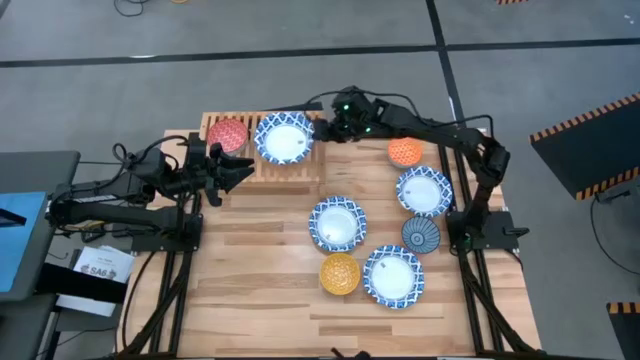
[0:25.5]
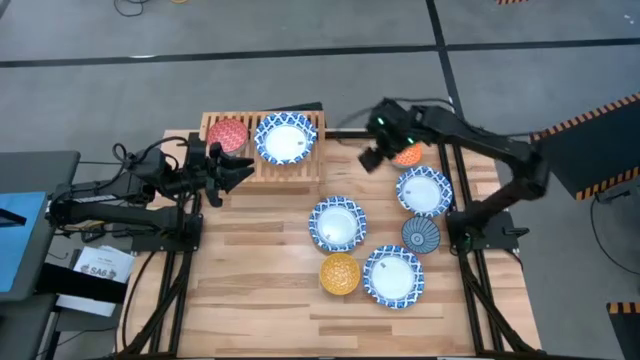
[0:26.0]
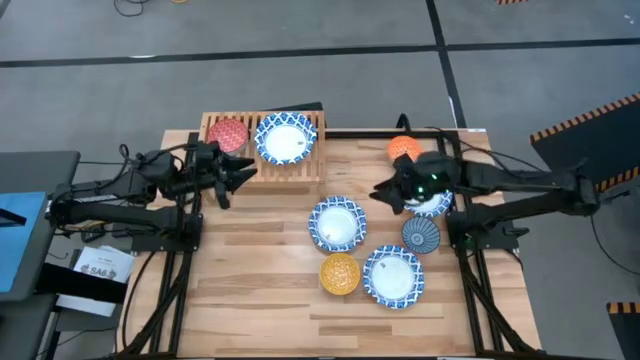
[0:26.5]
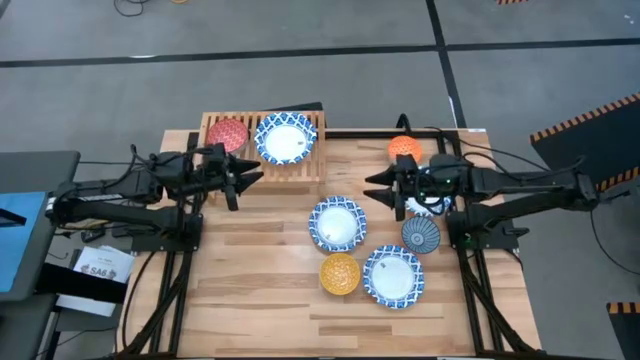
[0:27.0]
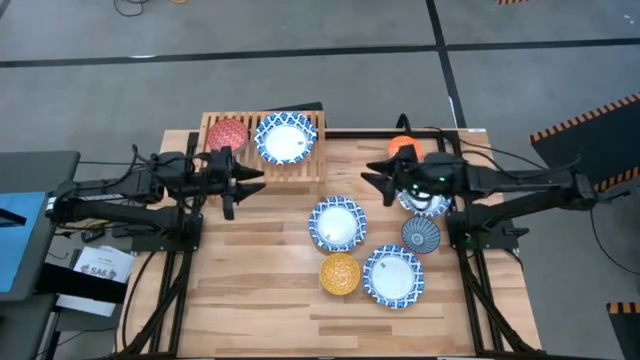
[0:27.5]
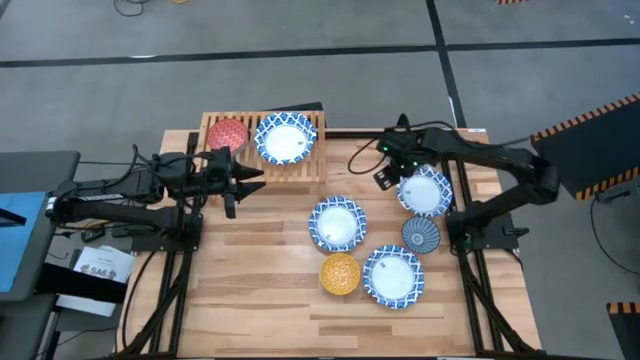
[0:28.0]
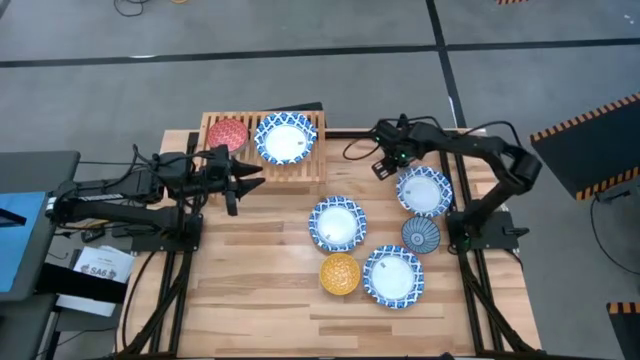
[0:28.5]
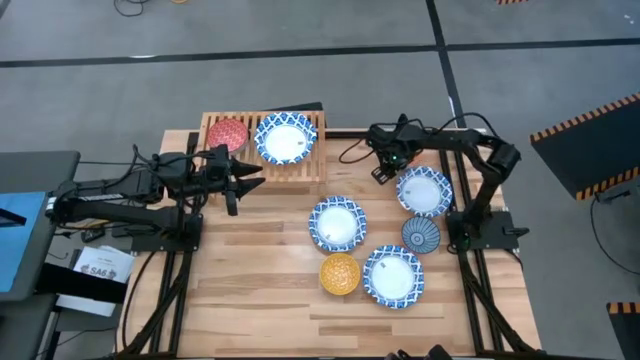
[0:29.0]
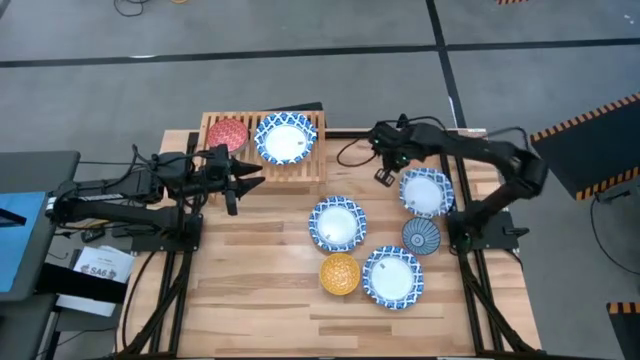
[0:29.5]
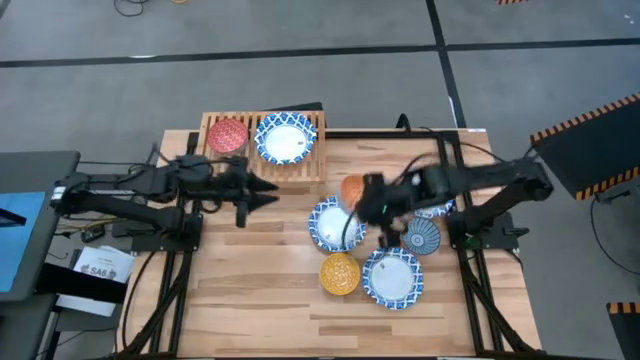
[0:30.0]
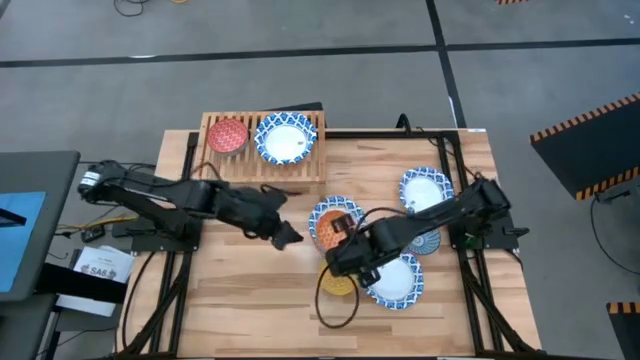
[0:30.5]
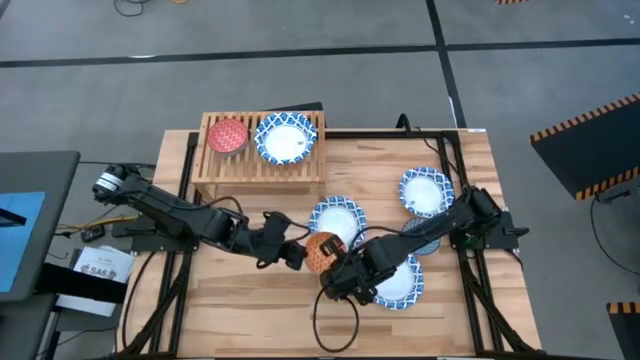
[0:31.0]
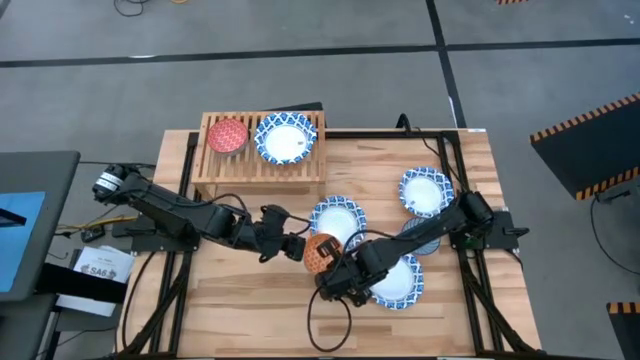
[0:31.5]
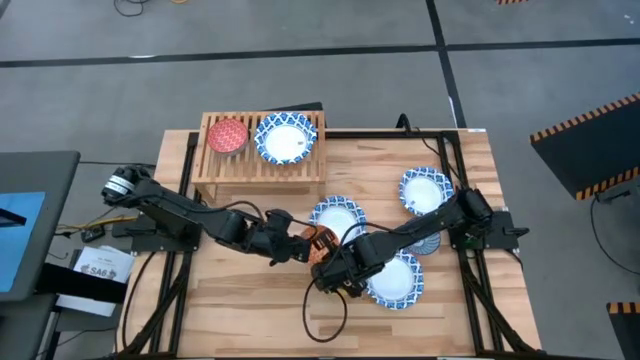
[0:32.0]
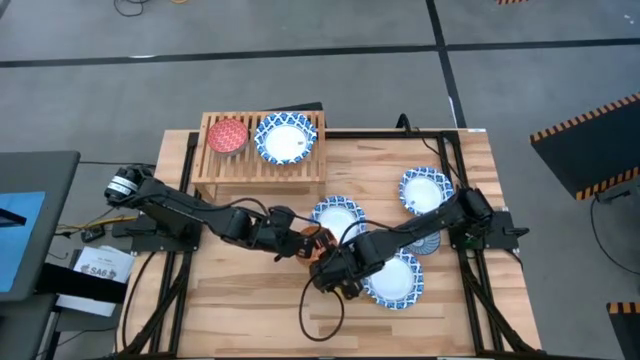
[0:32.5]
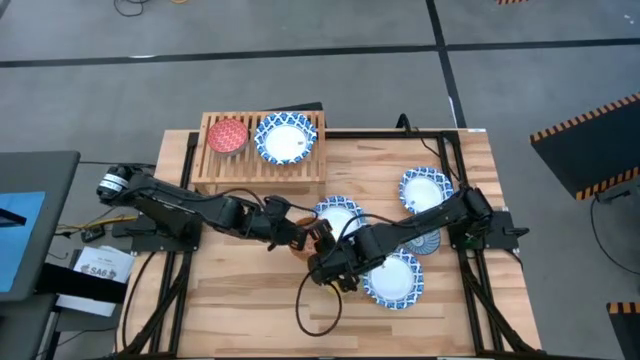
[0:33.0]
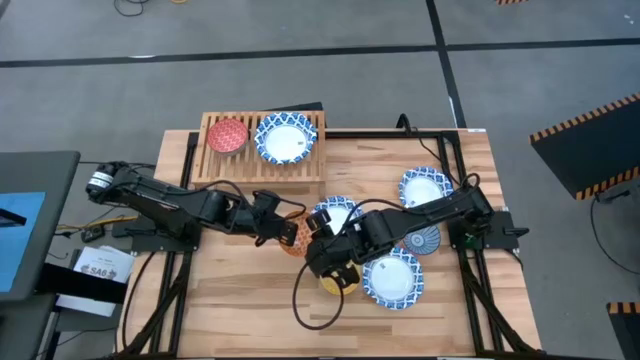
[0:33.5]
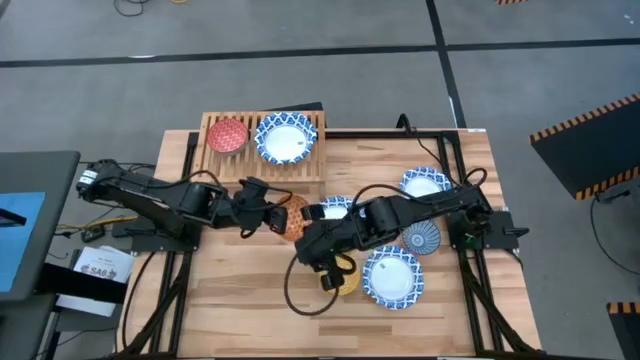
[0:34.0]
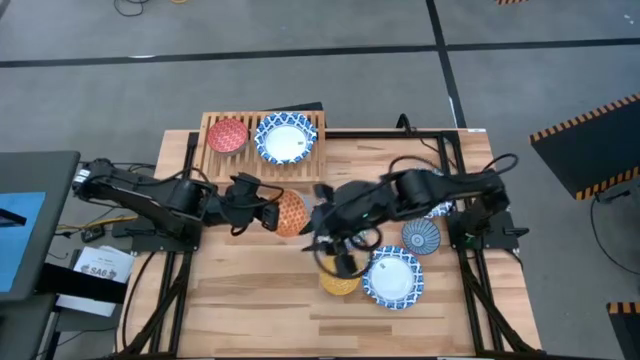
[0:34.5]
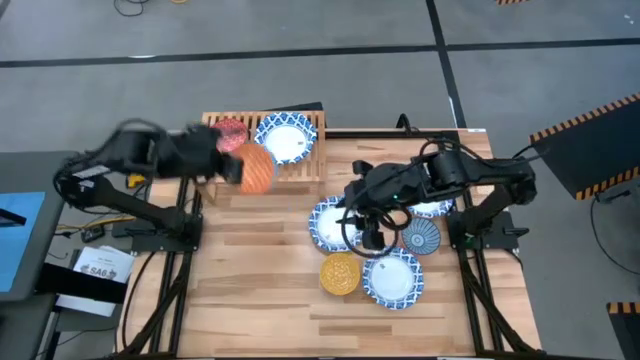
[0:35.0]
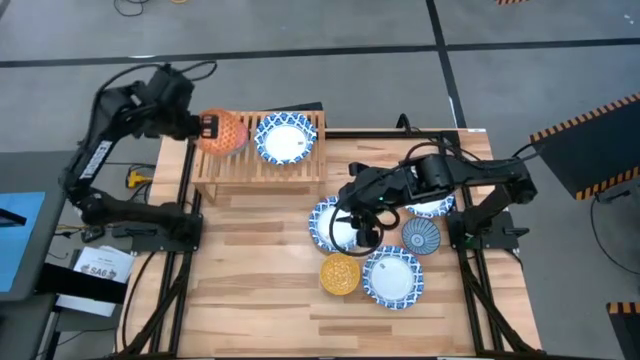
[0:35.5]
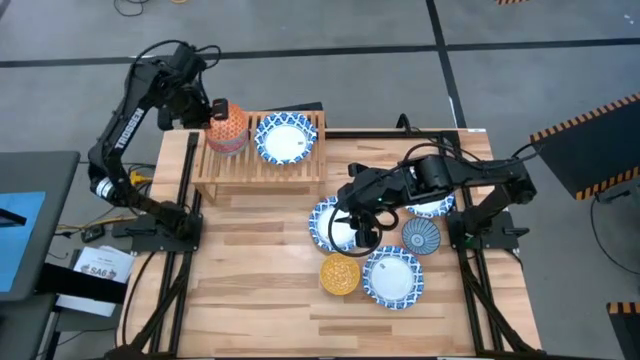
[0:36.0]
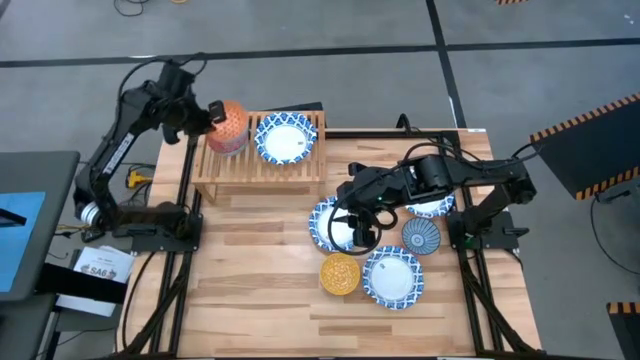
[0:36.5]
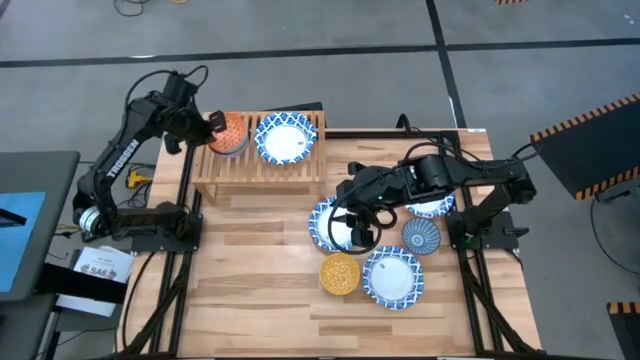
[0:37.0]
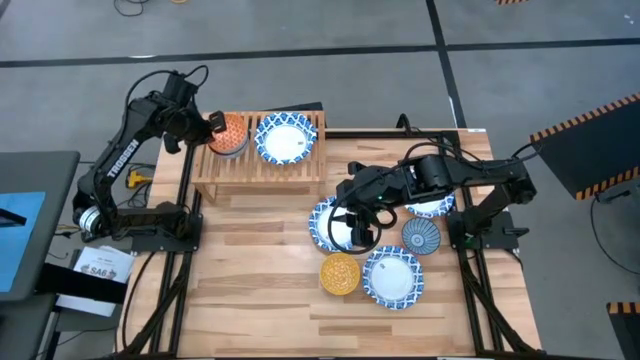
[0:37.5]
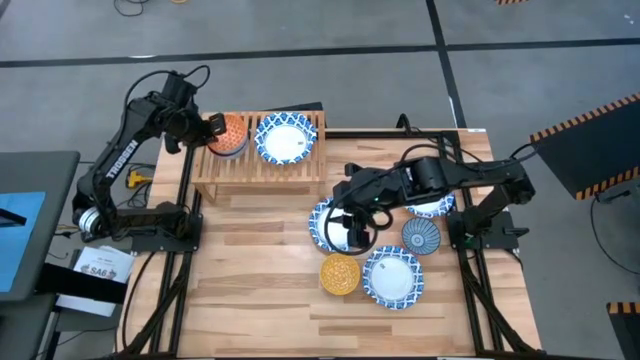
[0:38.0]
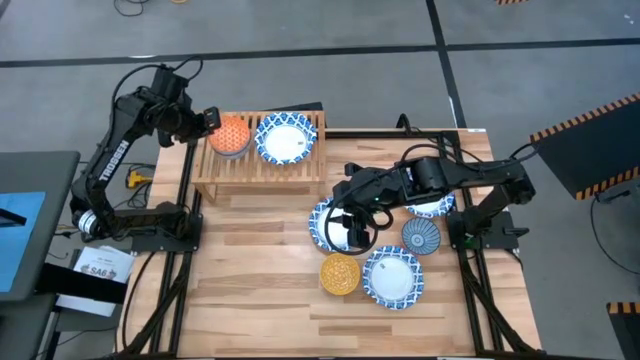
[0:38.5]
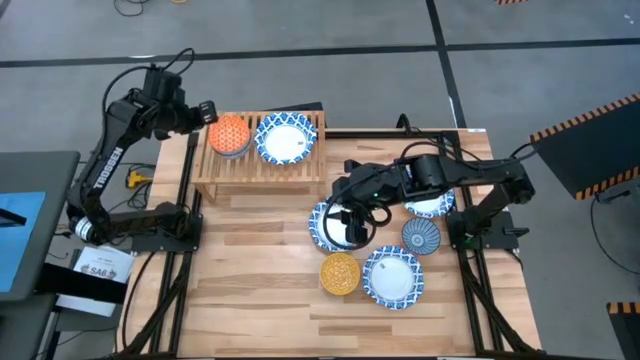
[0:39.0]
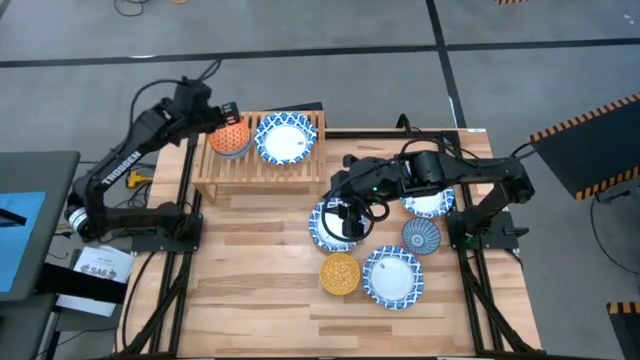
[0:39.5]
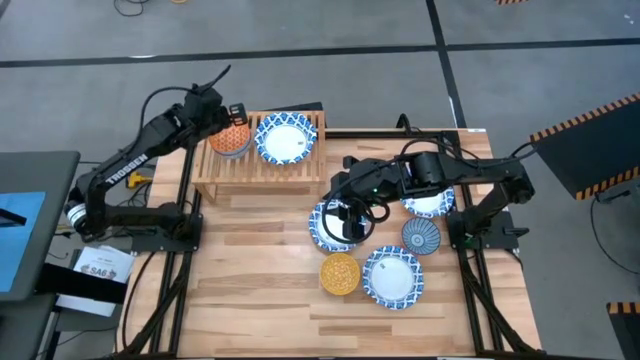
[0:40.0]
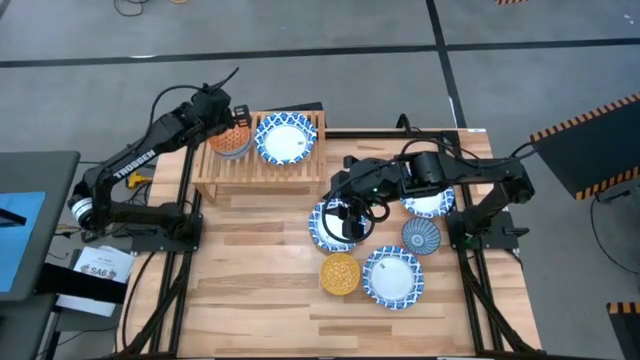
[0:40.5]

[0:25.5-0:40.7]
Task: Place and stack bowls onto a shelf
Stack the small orange bowl on top of the small red bowl on the shelf

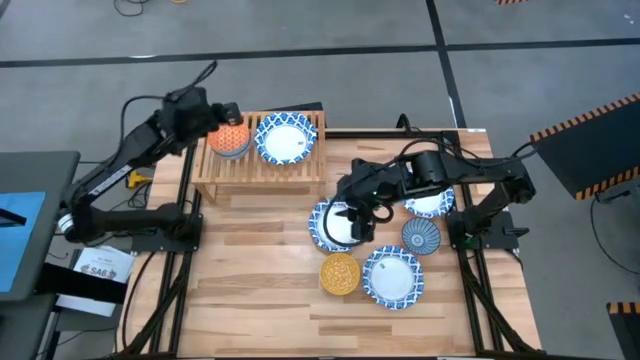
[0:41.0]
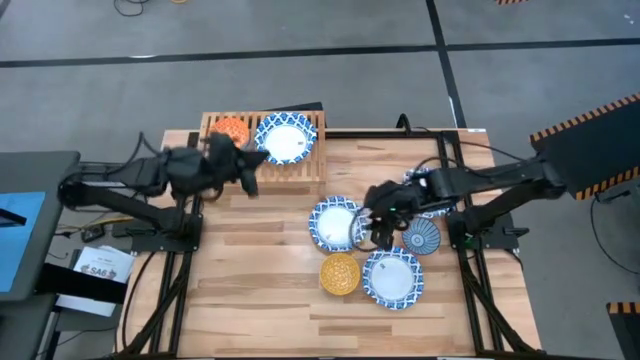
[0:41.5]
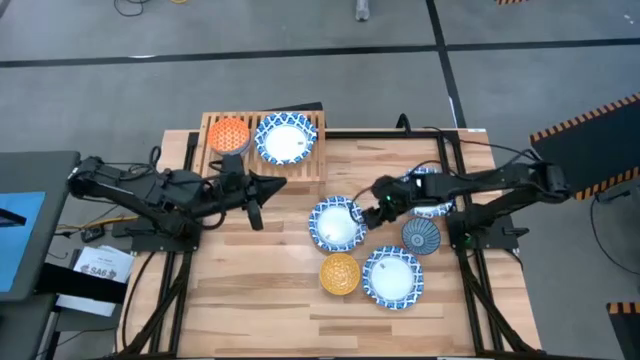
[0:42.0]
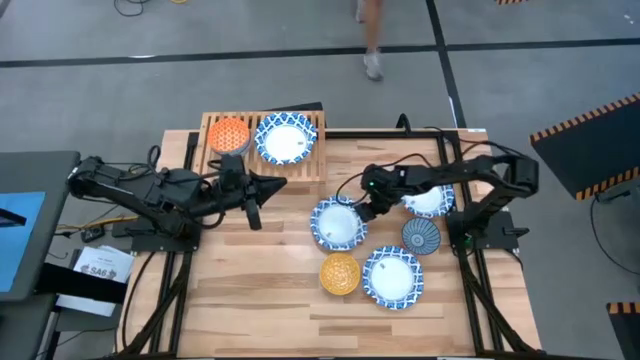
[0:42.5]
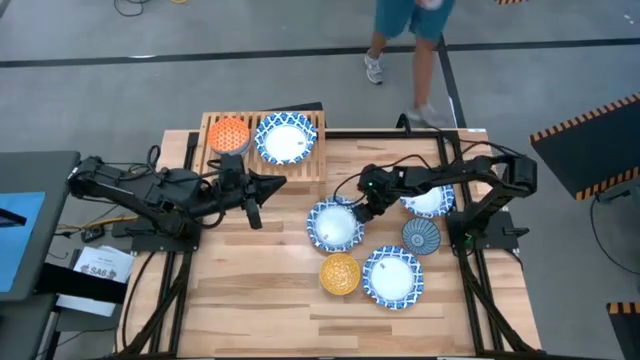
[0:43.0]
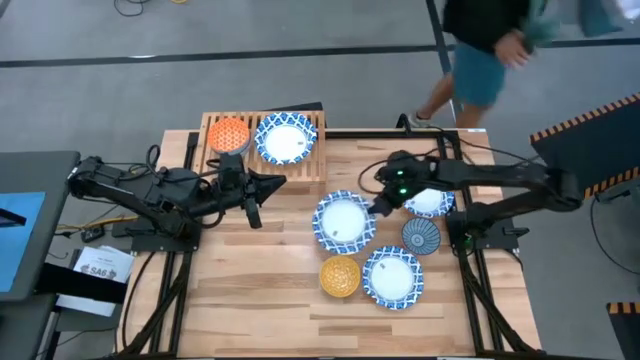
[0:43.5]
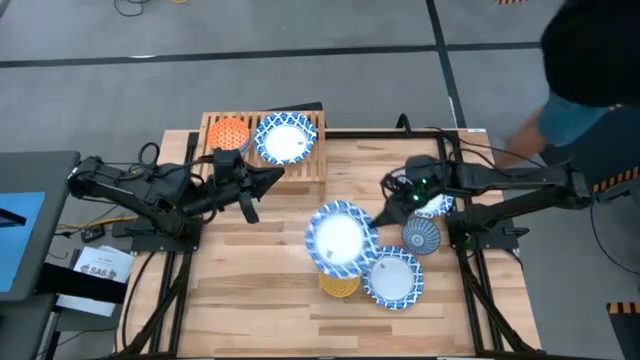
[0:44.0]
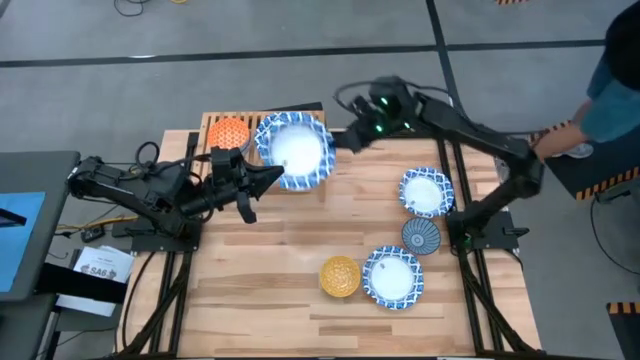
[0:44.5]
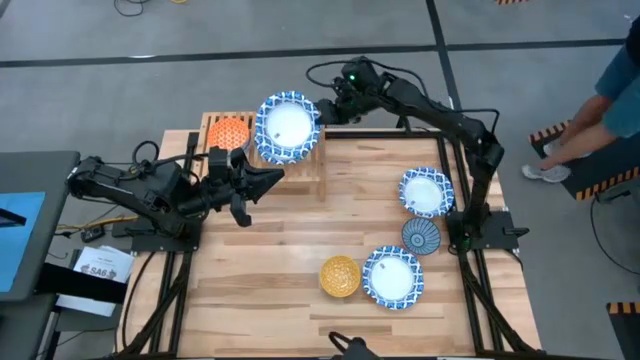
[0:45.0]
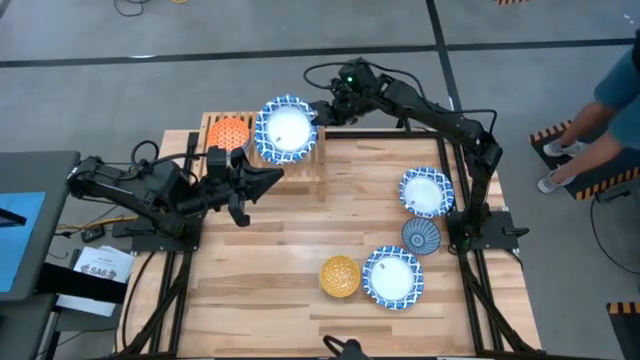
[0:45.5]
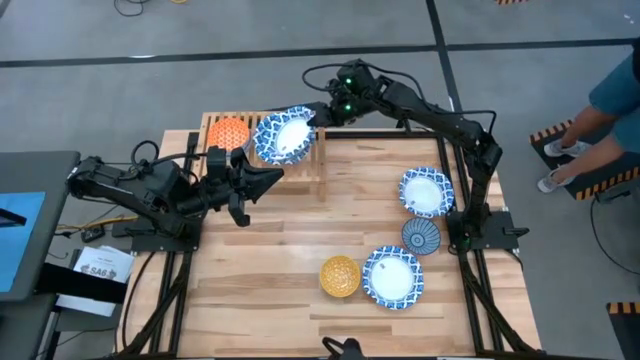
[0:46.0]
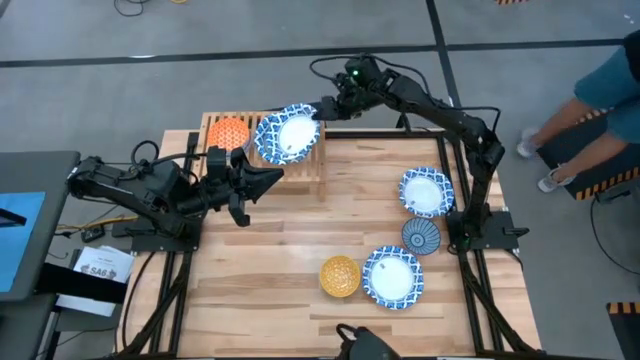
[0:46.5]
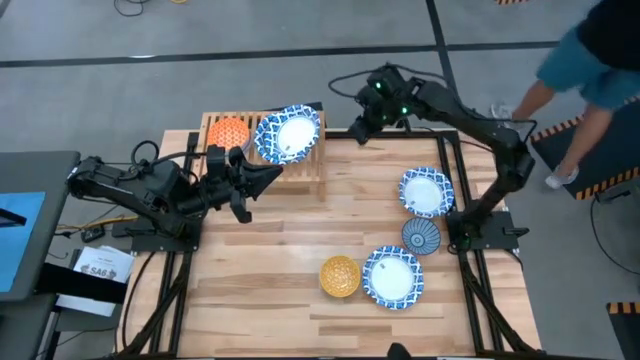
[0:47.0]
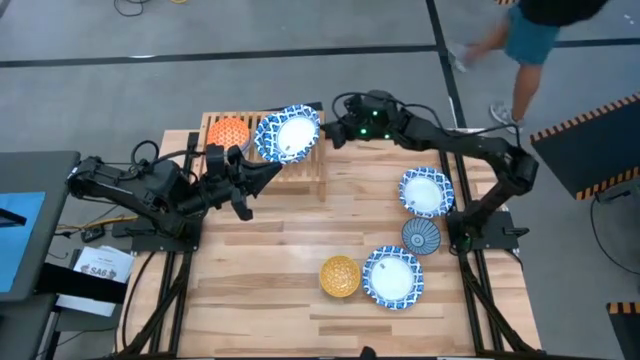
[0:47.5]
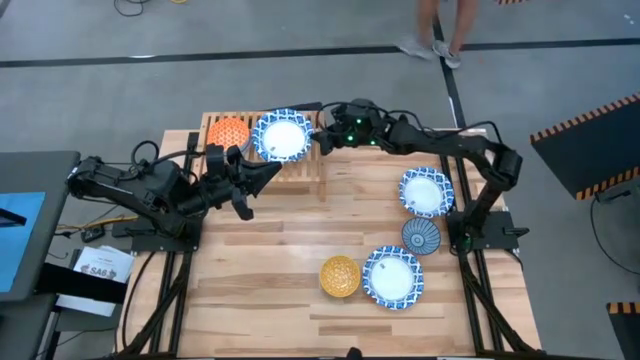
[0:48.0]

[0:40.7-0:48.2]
Stack the large white bowl on top of the white bowl on the shelf
